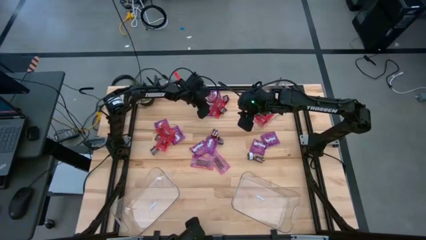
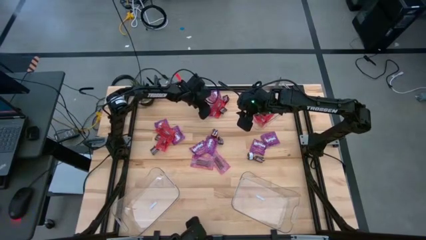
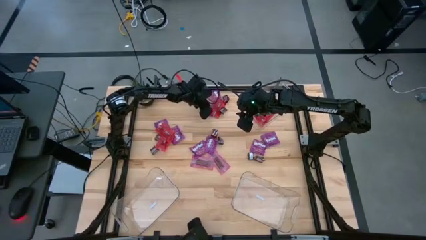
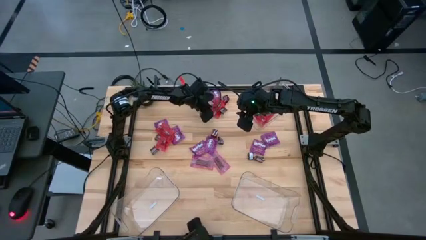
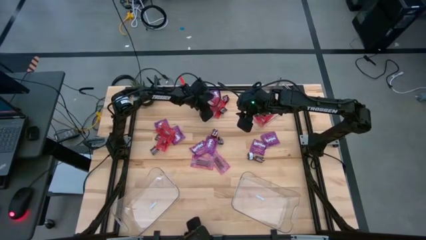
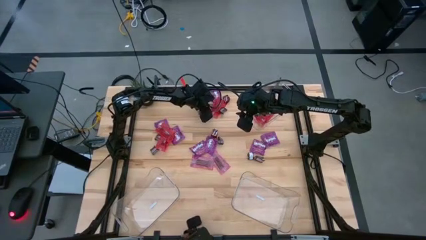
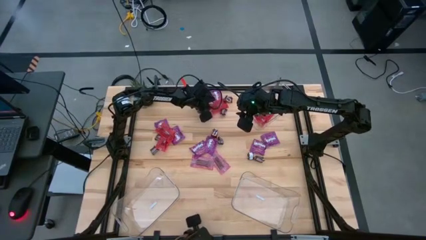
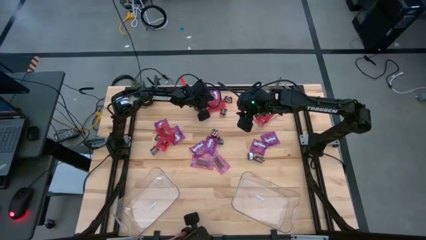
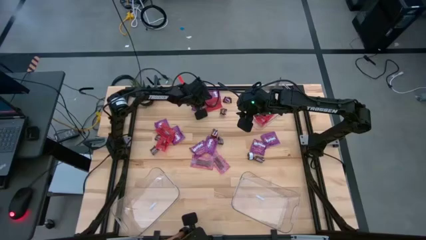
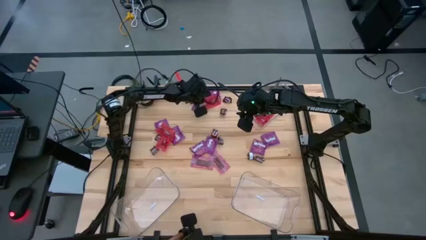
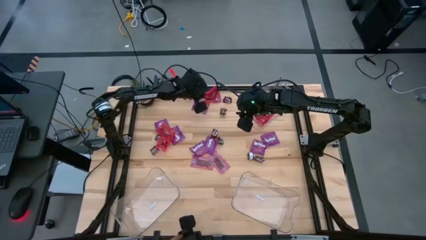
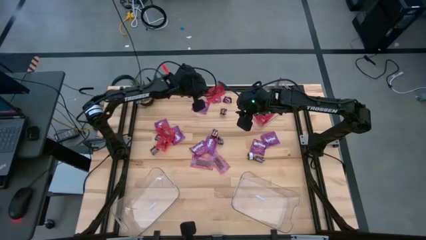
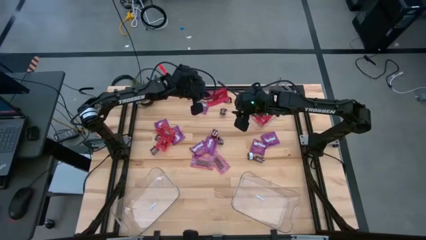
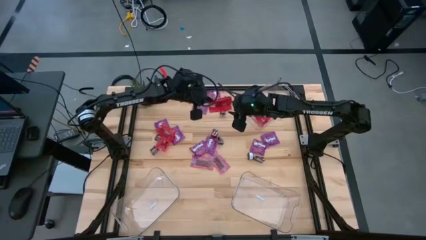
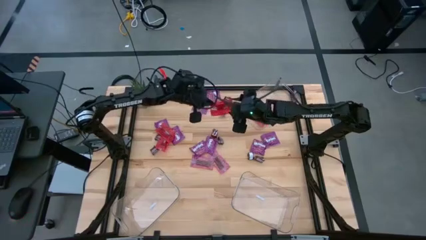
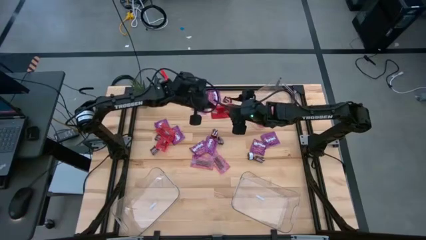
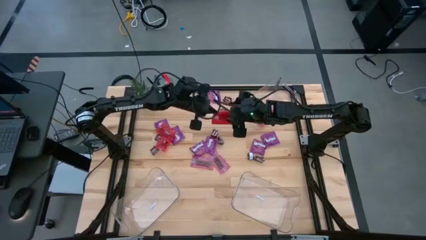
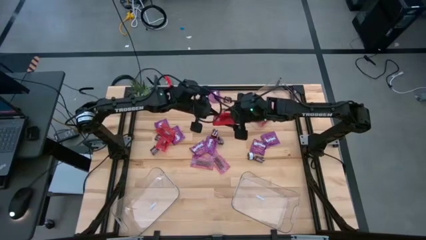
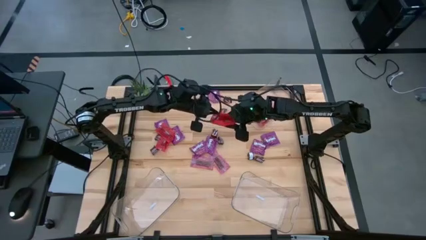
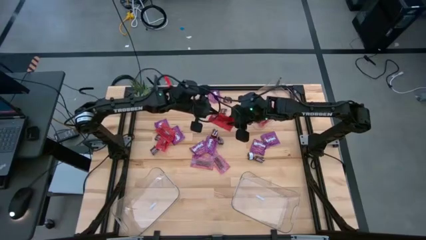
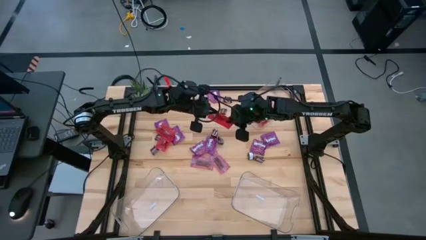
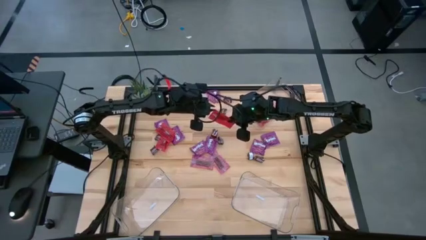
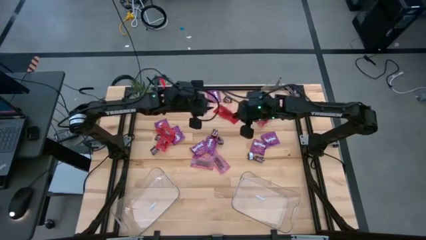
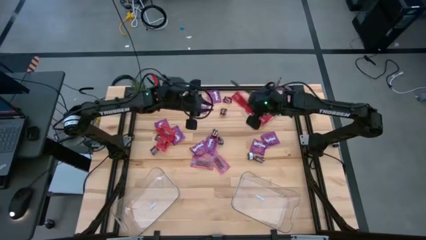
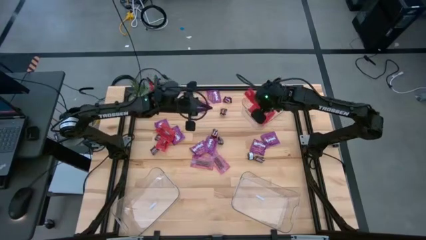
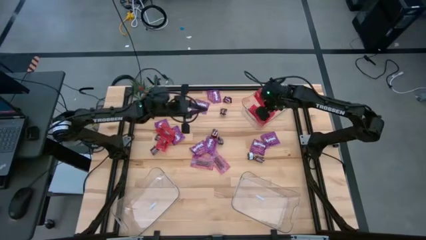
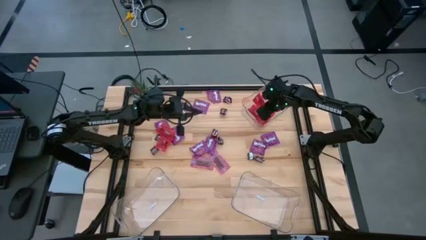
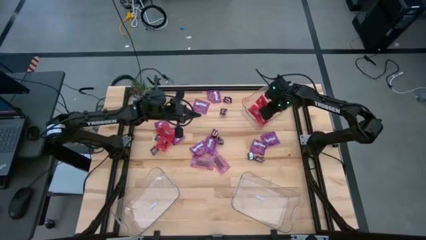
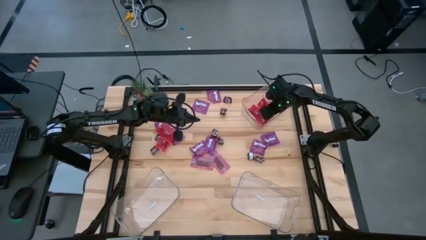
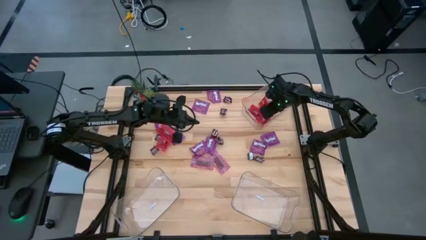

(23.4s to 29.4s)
Task: Sort candy
Put the red candy into the top transparent bin

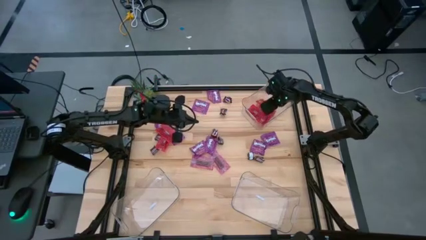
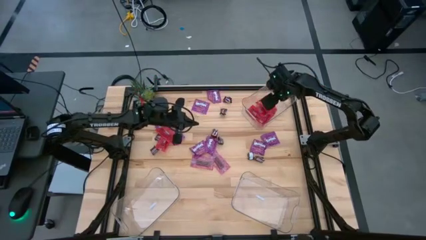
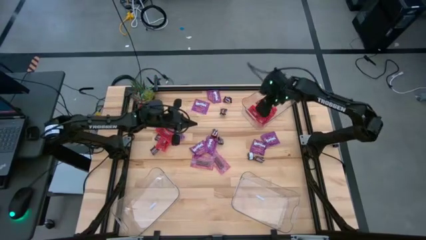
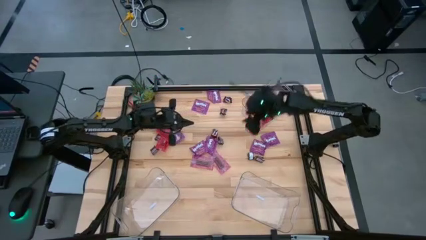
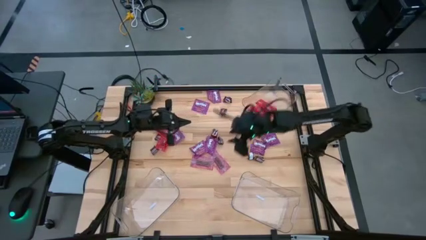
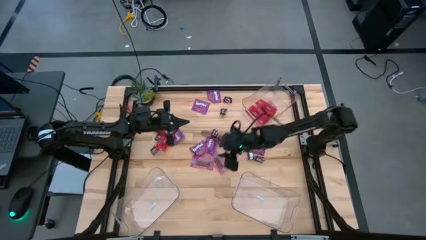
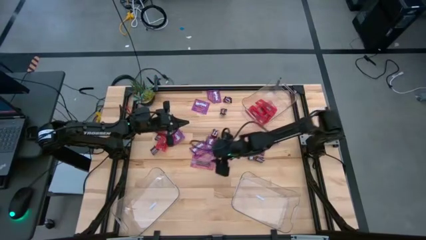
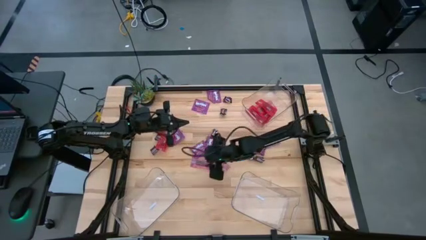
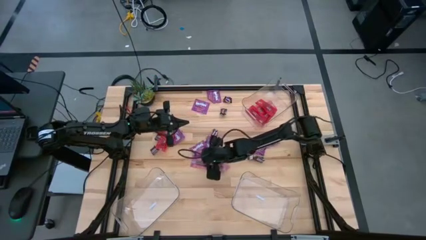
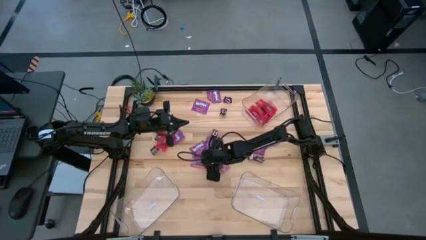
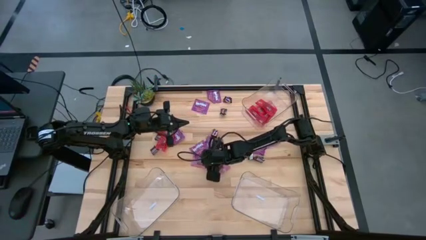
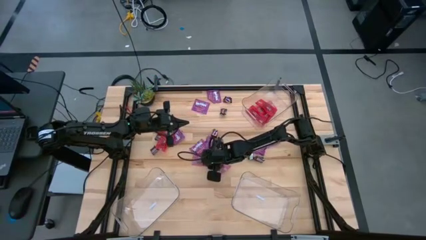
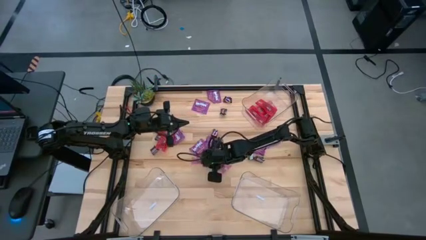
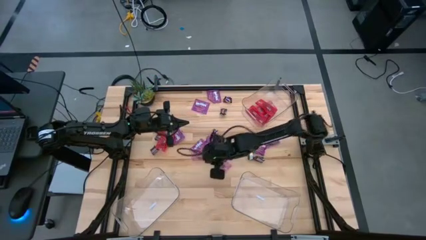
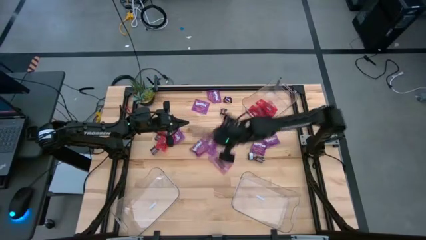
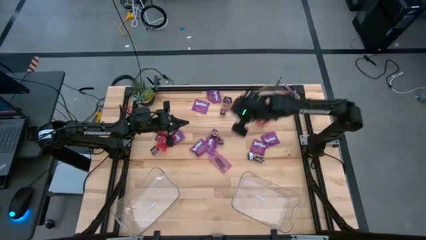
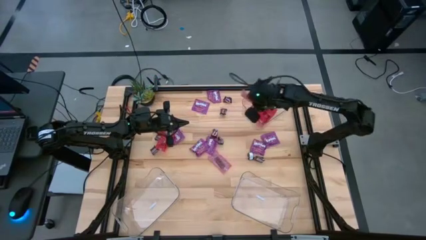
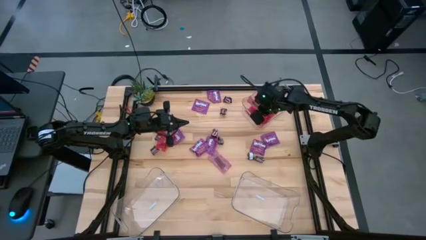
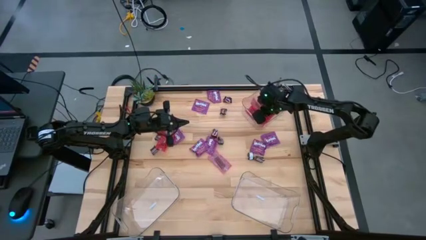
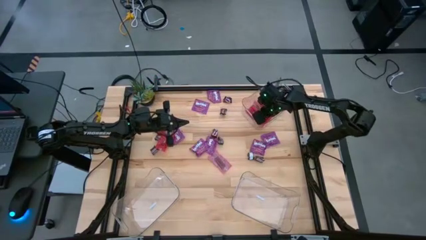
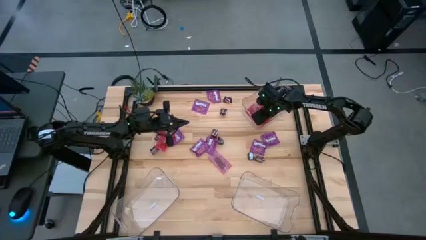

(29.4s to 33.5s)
Put the red candy into the top transparent bin

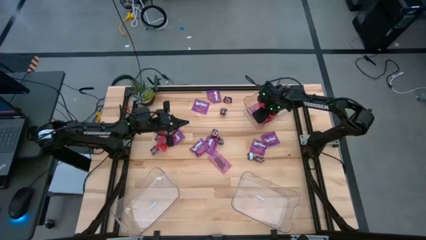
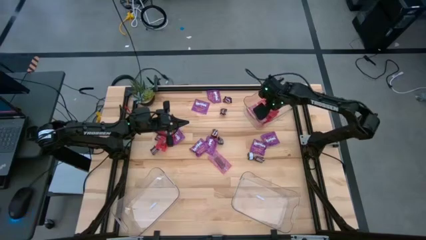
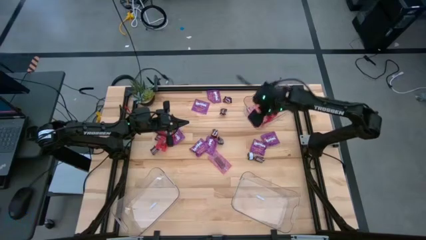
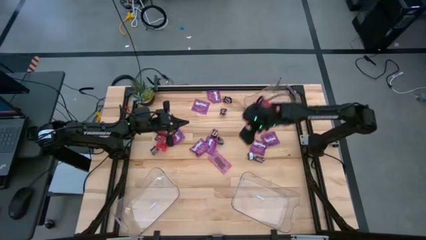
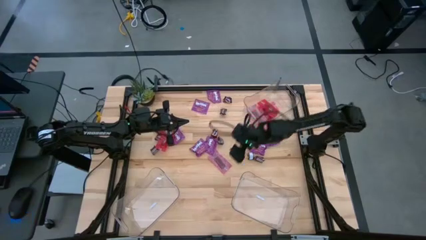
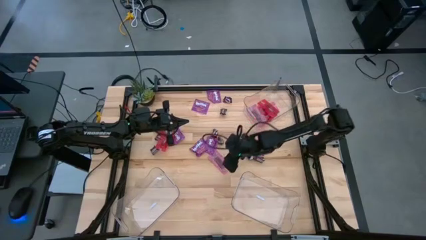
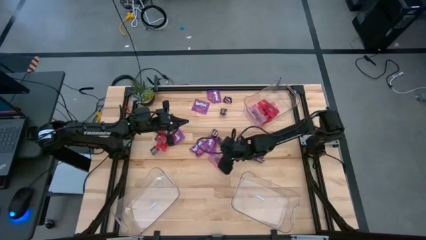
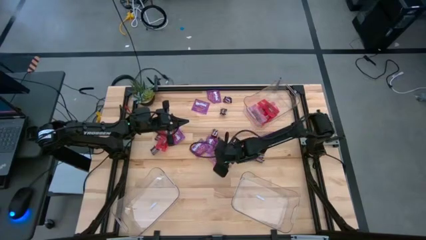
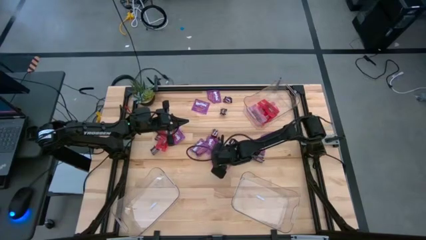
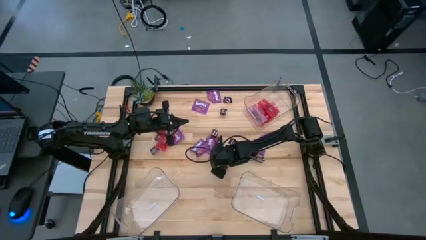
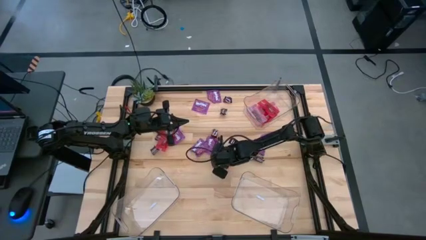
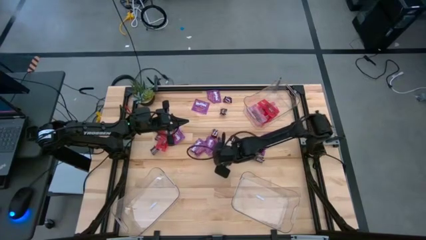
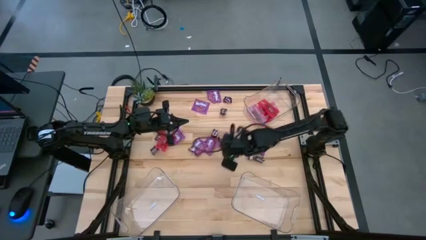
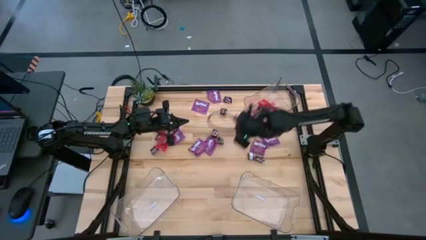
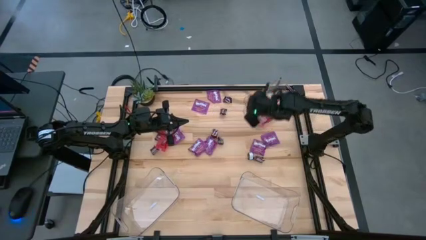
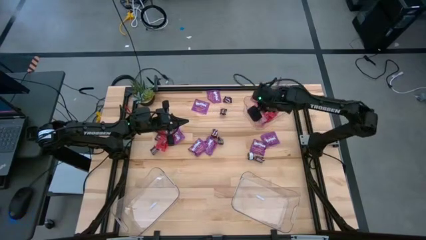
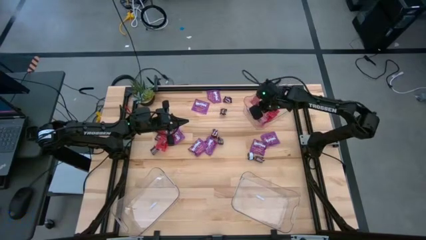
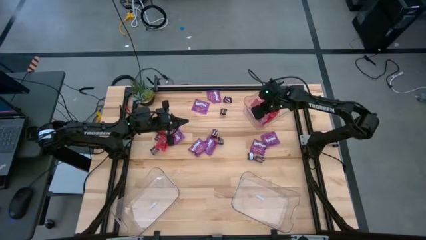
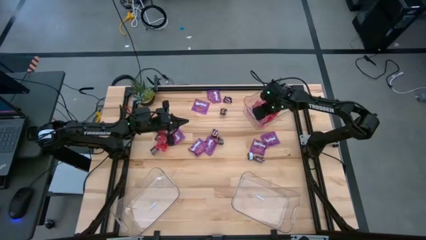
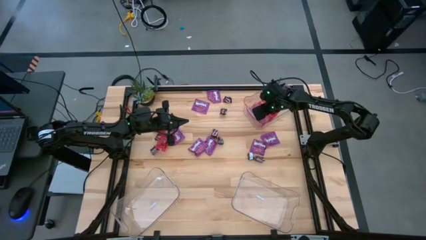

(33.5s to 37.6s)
Put the red candy into the top right transparent bin

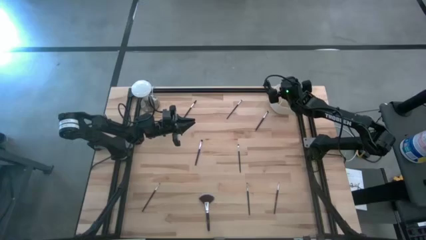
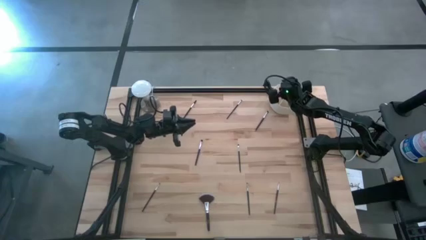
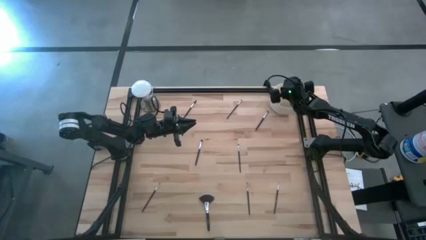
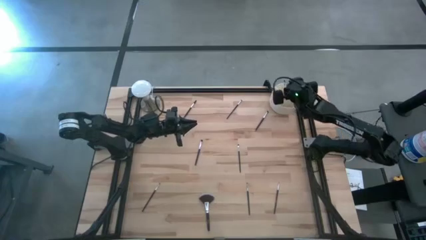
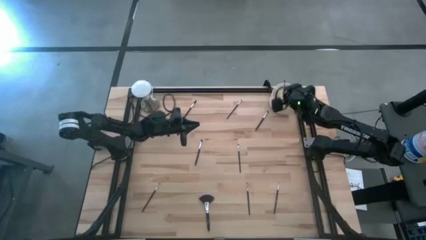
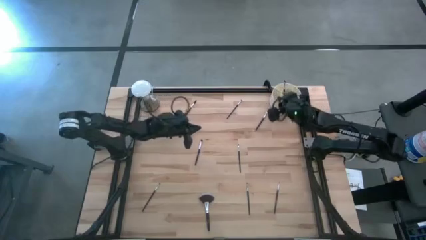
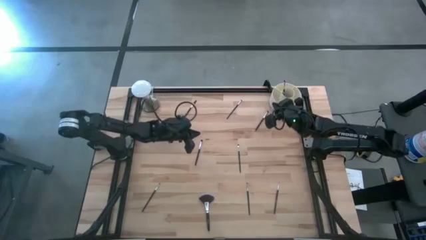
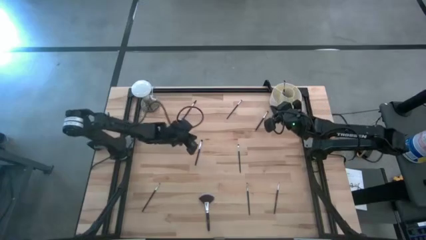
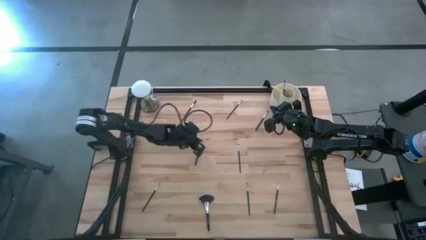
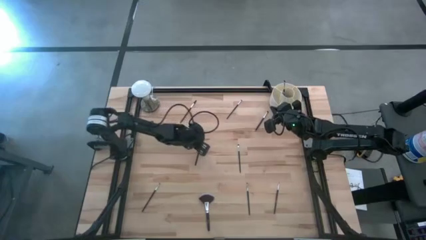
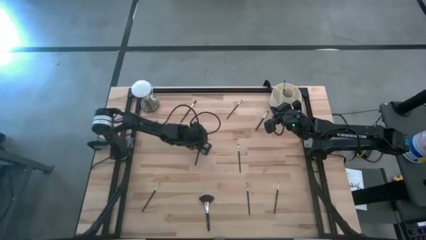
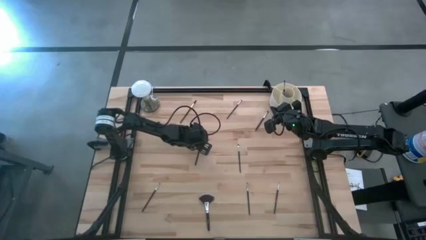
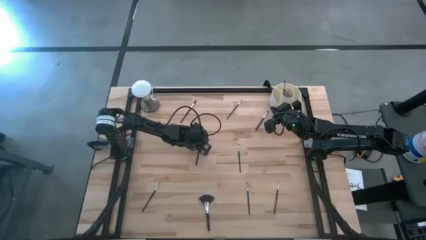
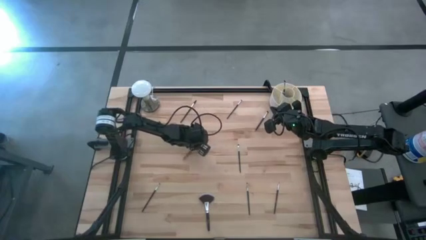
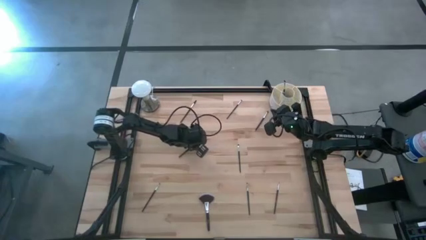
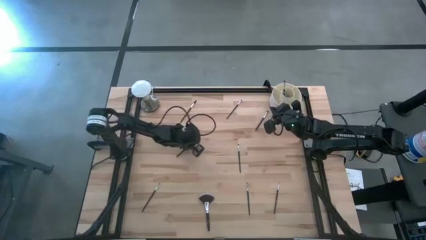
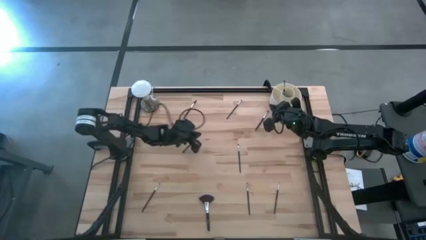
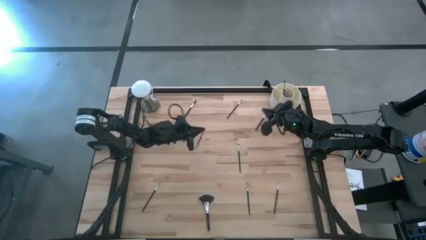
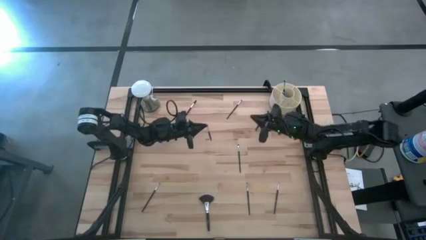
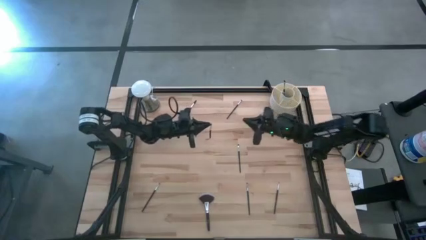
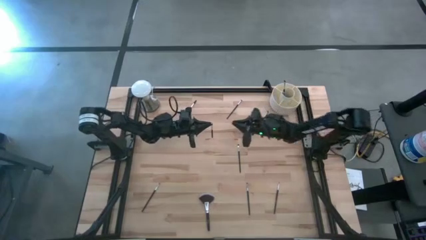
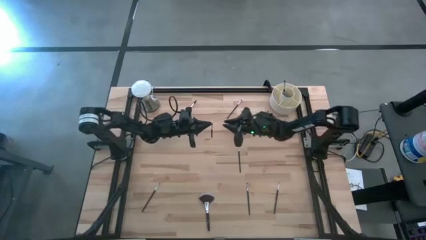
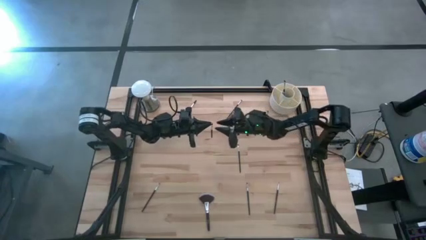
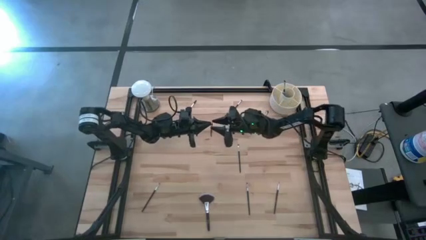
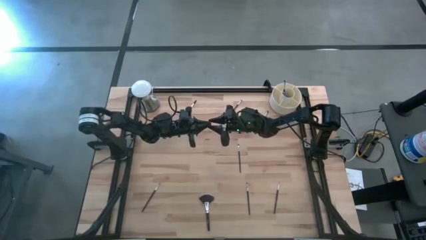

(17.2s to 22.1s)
Task: Pick & Place Makeup Brushes
Put the black powder brush into the white makeup holder
